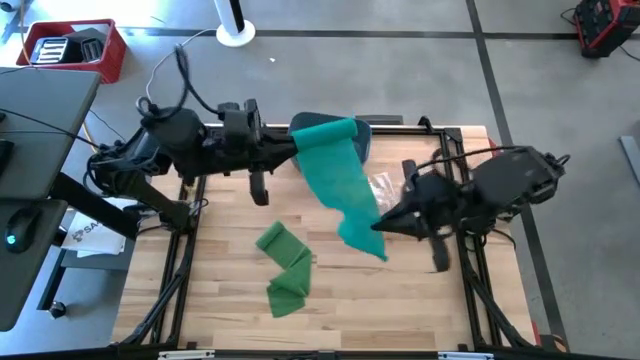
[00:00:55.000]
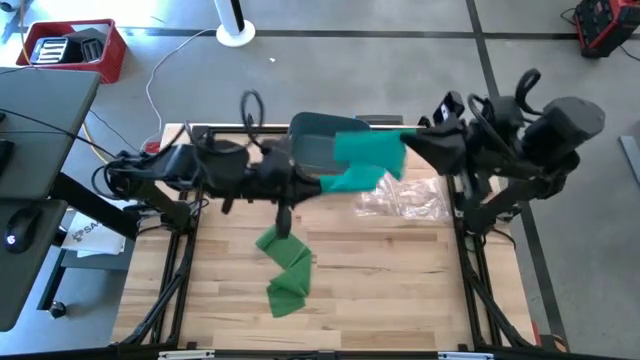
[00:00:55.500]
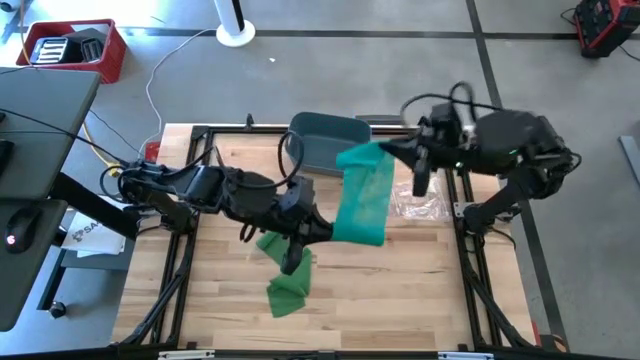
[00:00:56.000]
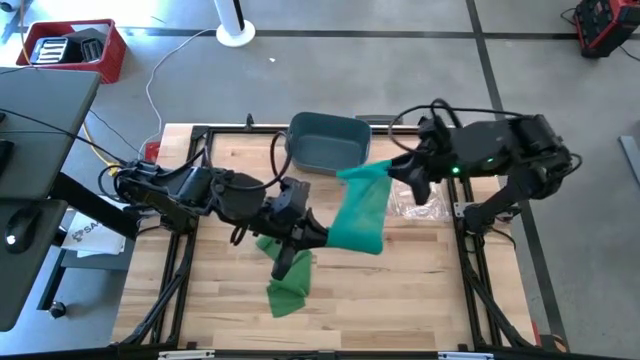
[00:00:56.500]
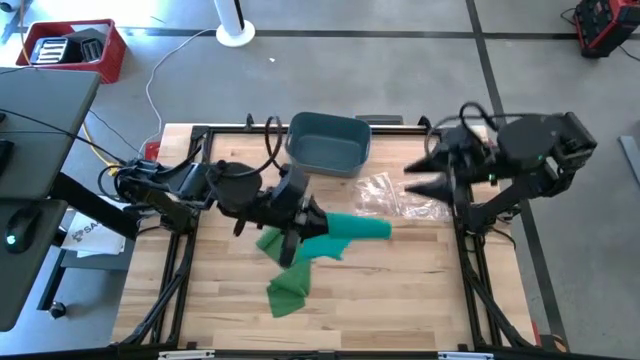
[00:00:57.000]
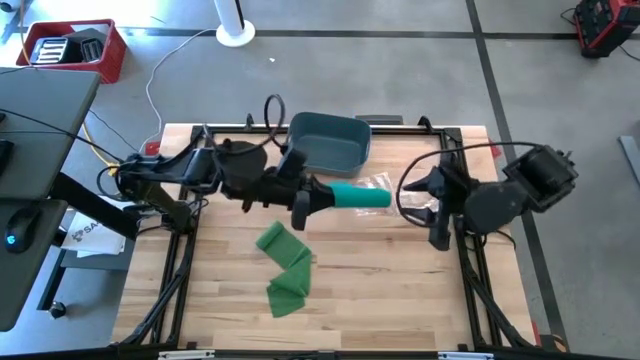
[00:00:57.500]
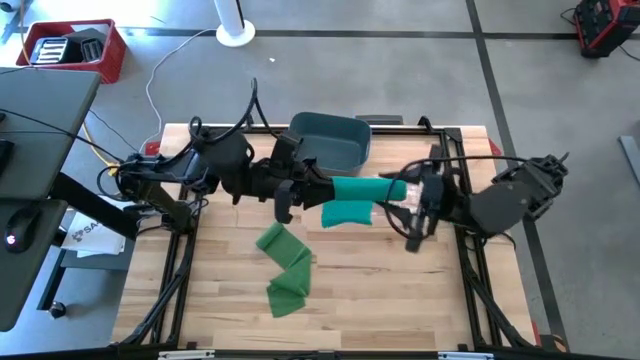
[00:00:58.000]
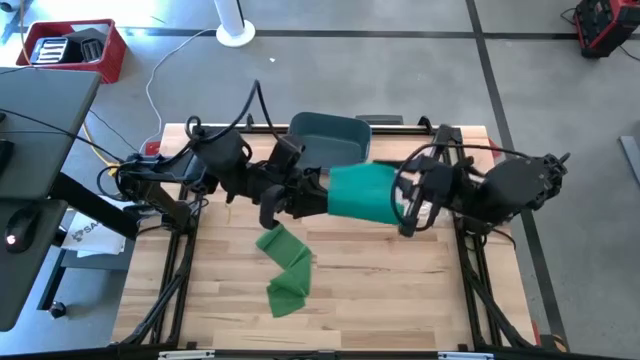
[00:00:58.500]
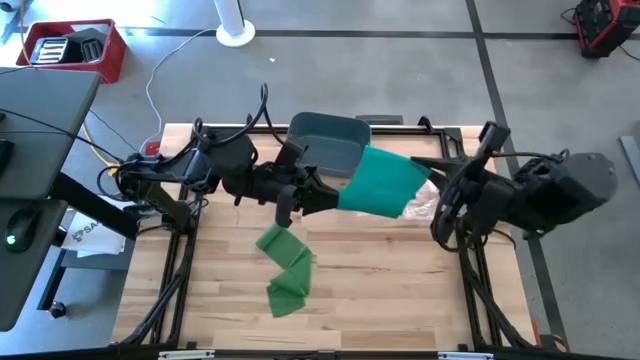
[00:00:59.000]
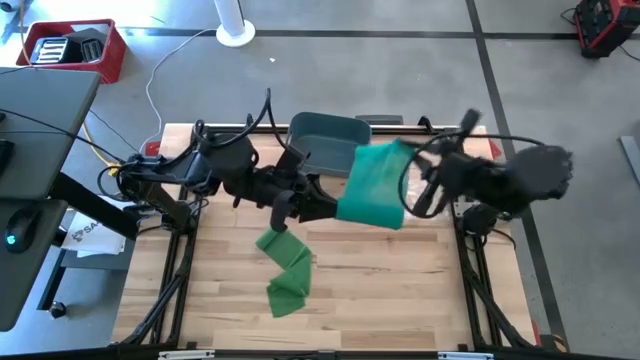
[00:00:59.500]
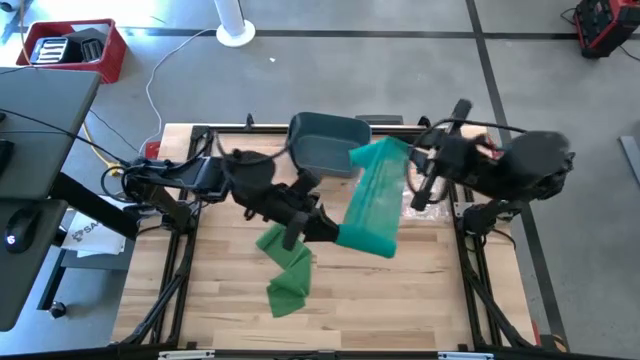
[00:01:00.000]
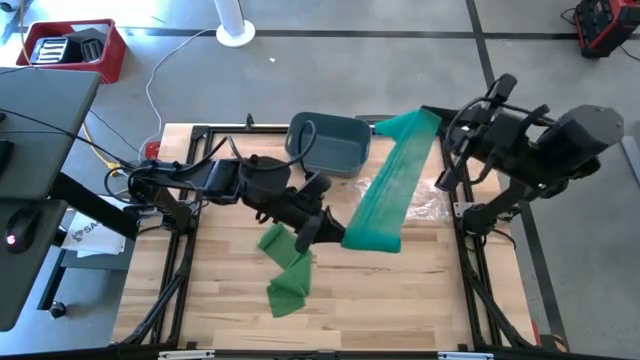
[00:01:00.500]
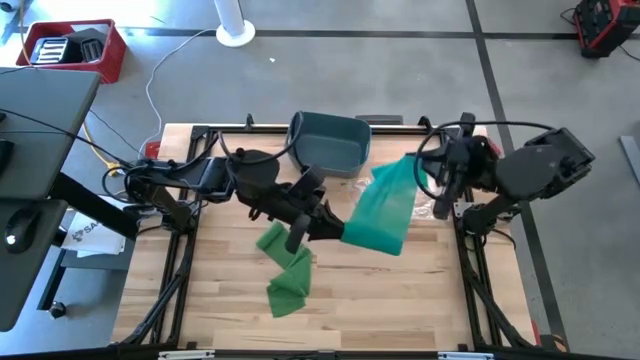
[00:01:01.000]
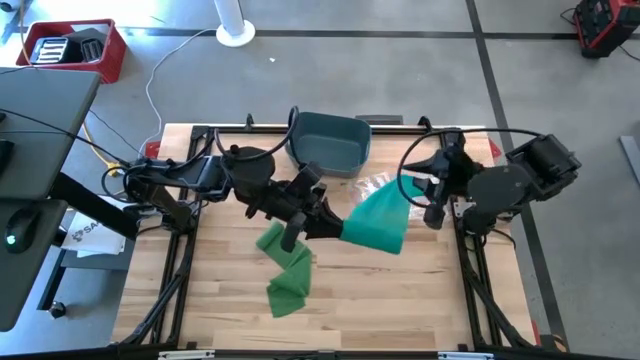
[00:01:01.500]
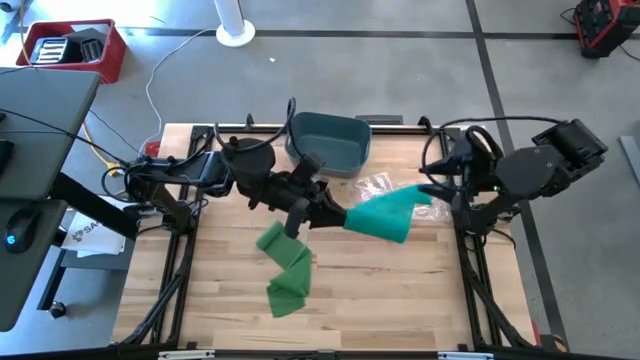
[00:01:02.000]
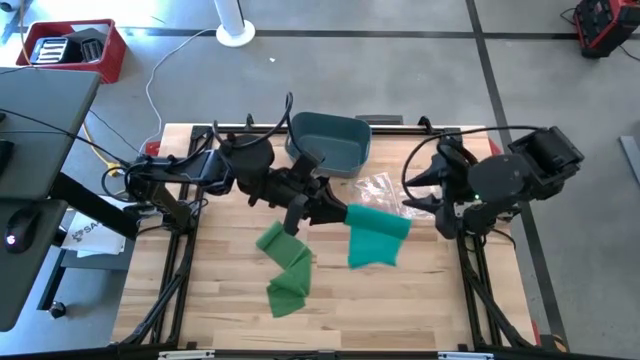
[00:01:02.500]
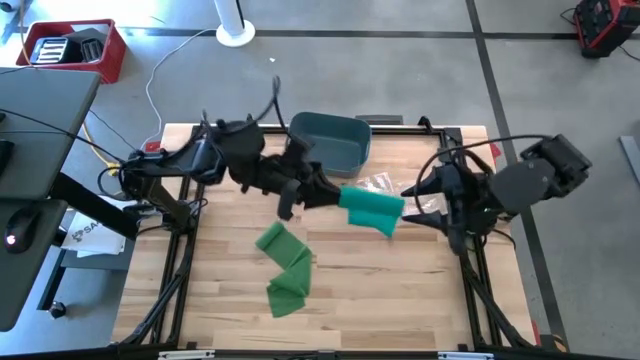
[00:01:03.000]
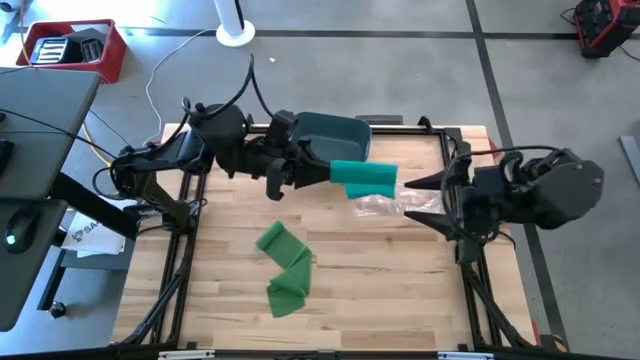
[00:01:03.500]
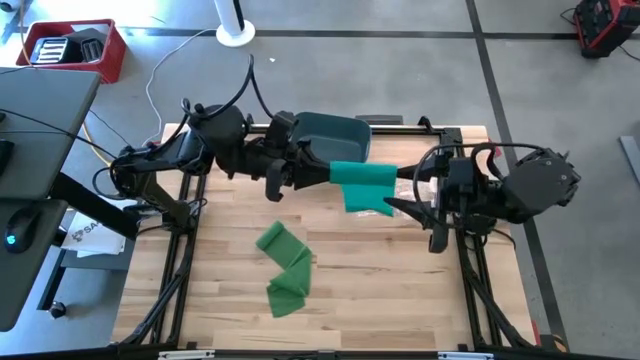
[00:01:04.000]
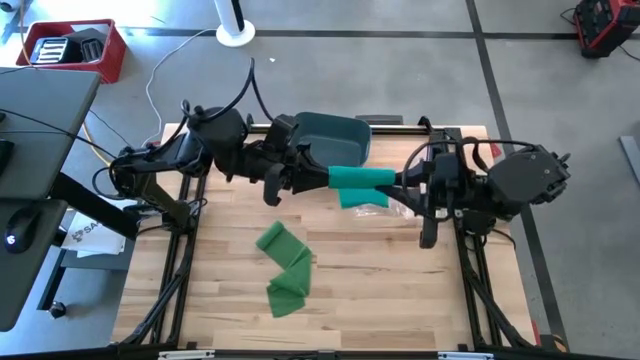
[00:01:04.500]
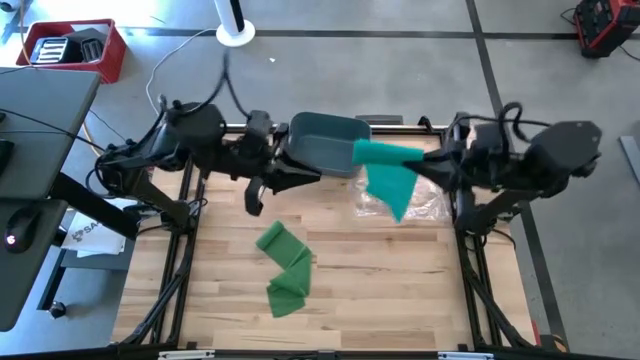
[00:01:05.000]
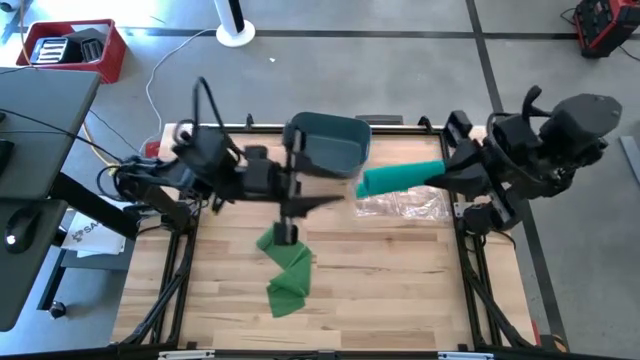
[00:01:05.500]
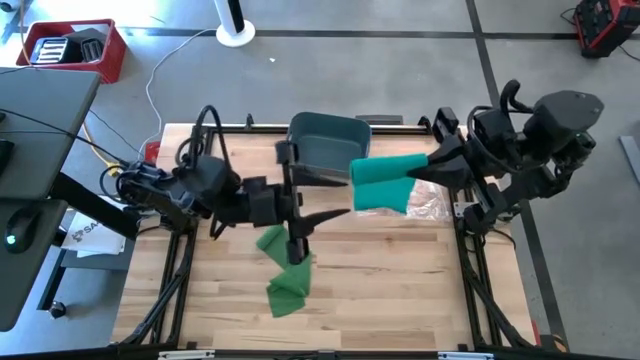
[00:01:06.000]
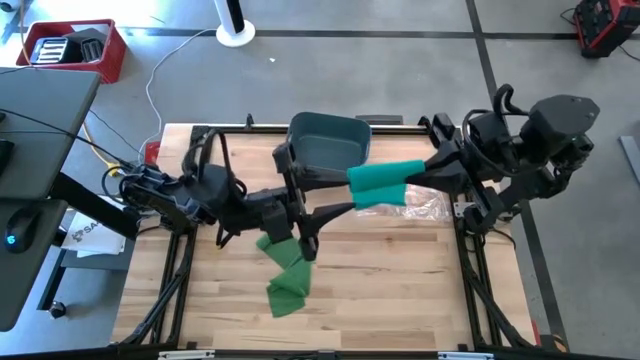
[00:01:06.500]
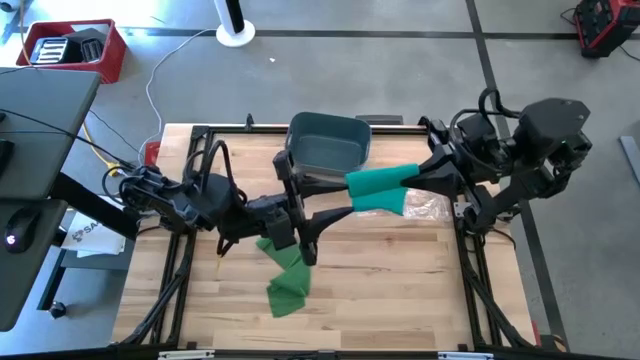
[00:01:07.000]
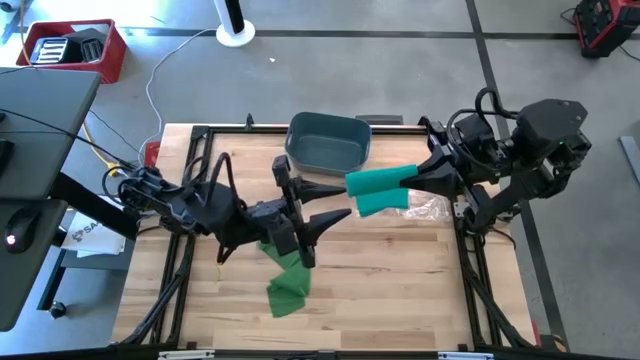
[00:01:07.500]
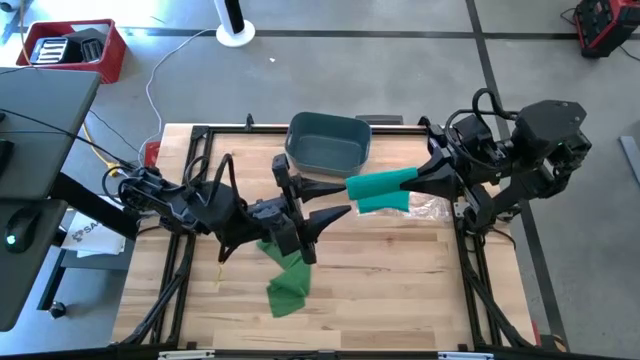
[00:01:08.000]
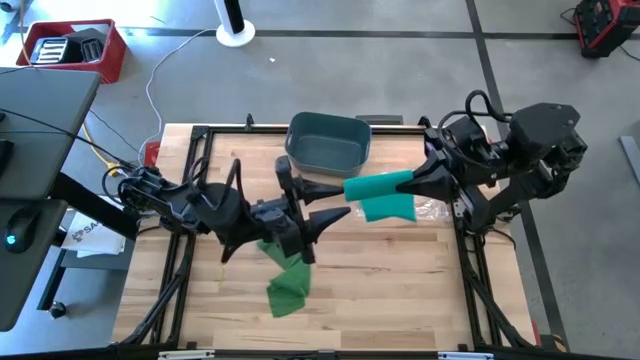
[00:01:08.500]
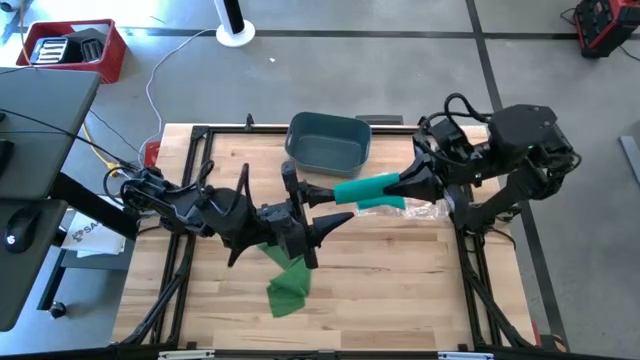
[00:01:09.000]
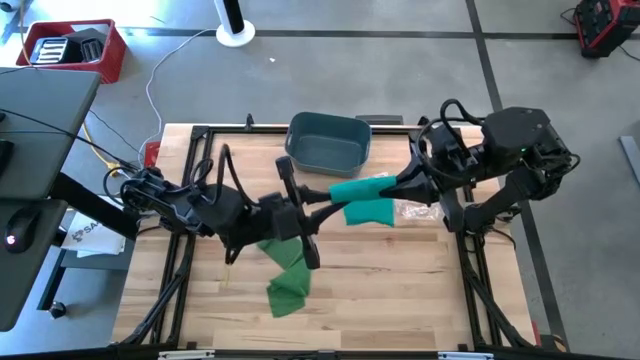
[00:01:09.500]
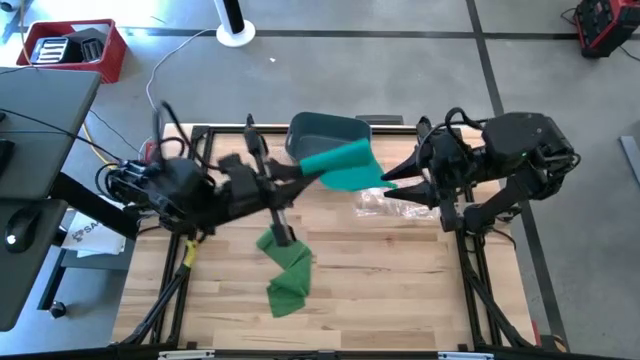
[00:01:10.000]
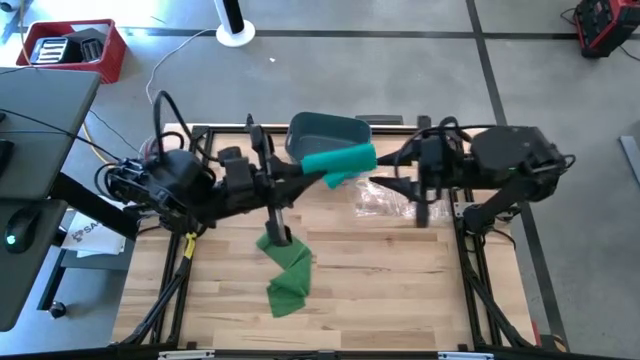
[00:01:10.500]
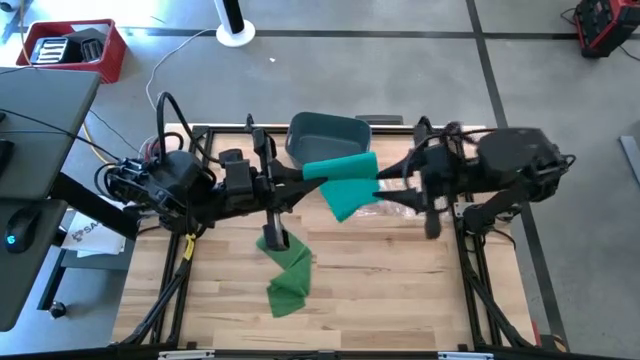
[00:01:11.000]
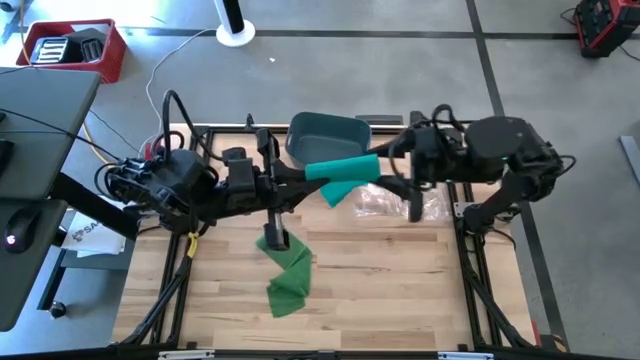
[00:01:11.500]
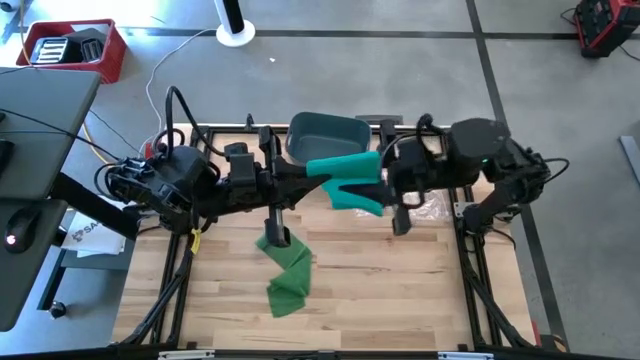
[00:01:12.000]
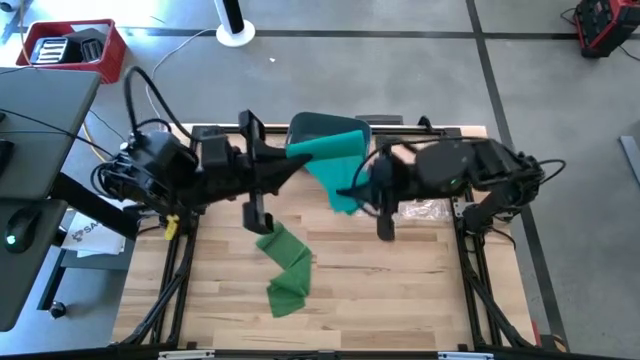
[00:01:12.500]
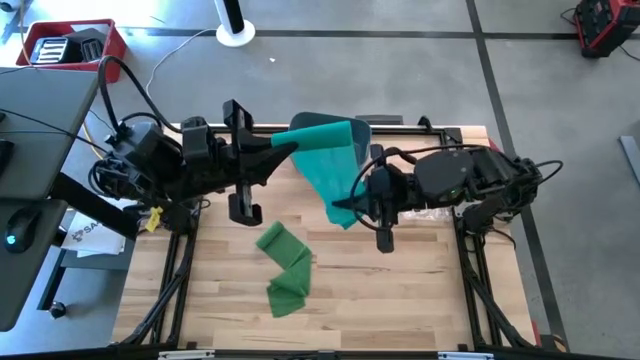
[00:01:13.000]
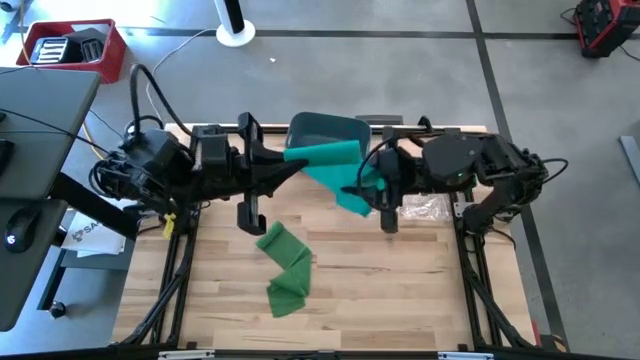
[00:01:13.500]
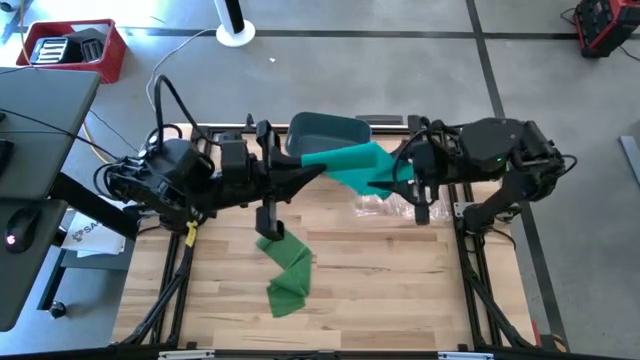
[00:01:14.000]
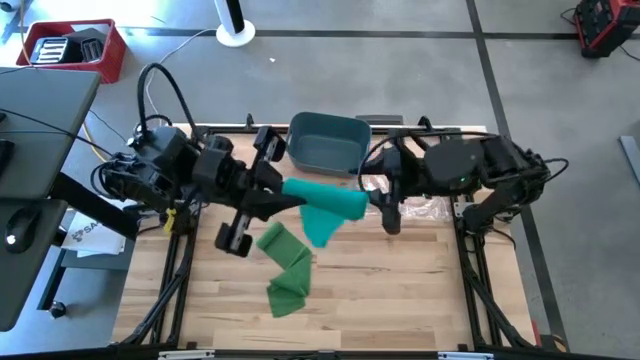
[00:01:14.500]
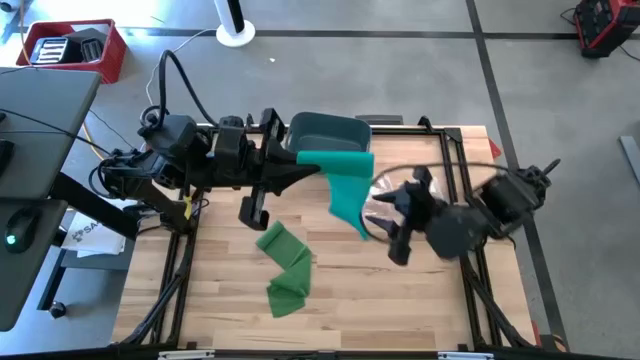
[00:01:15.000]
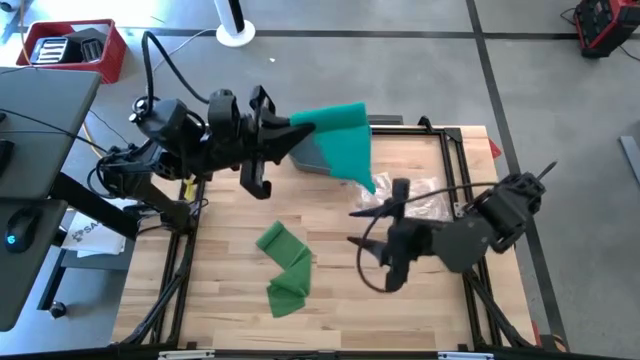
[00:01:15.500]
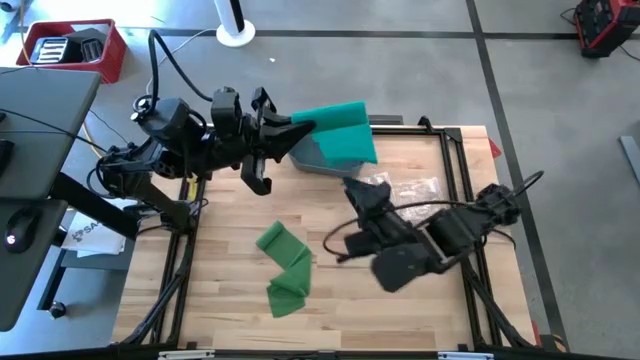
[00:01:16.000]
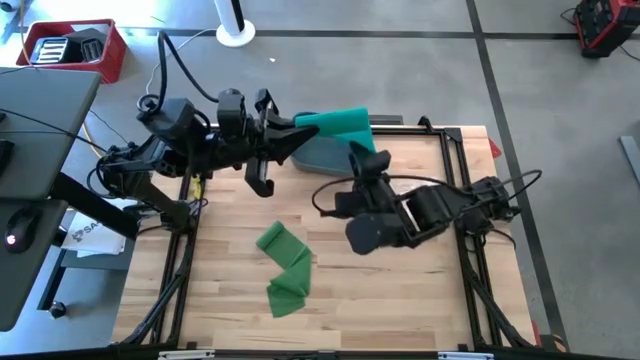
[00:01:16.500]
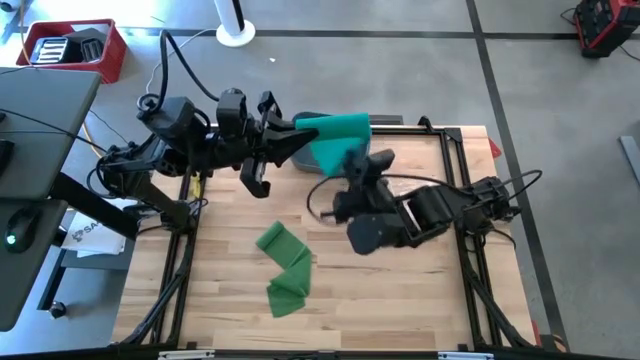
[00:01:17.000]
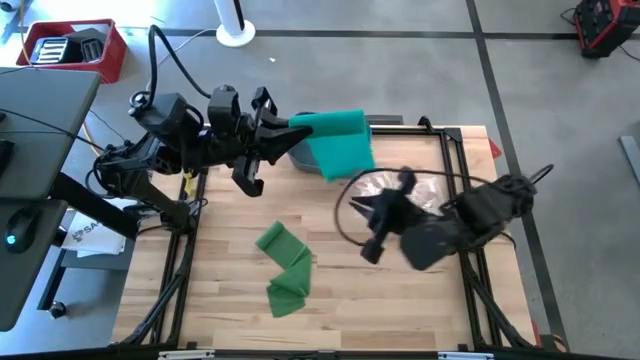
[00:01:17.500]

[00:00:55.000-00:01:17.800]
Task: Roll bandage
Roll the blue bandage
